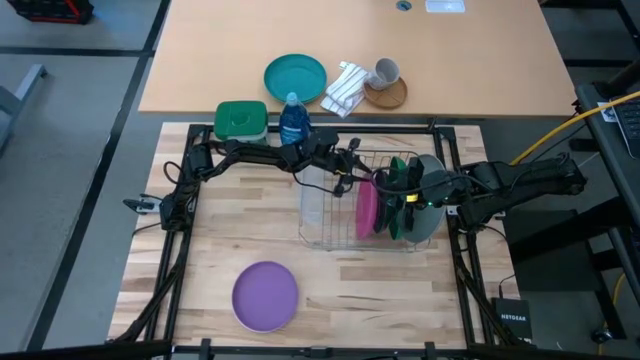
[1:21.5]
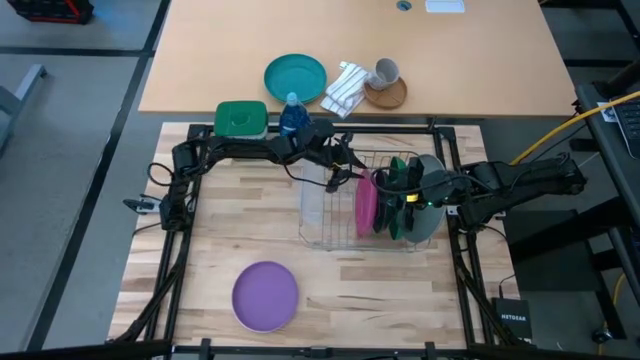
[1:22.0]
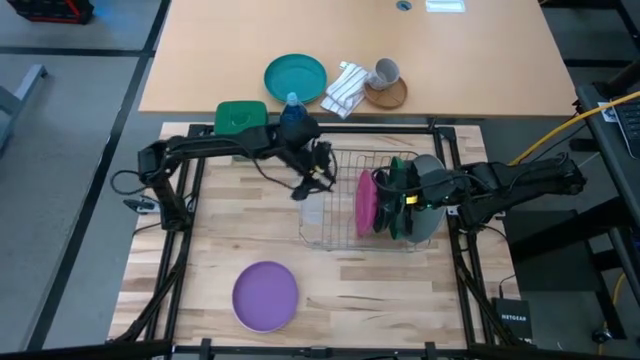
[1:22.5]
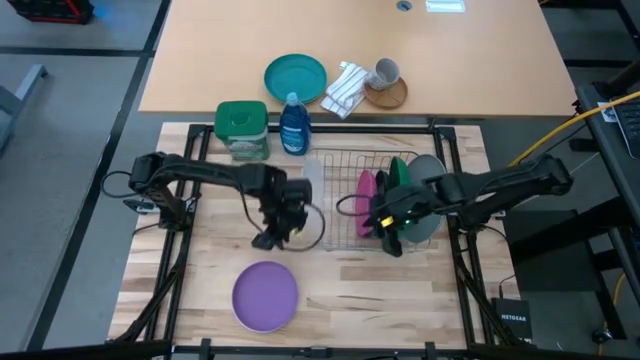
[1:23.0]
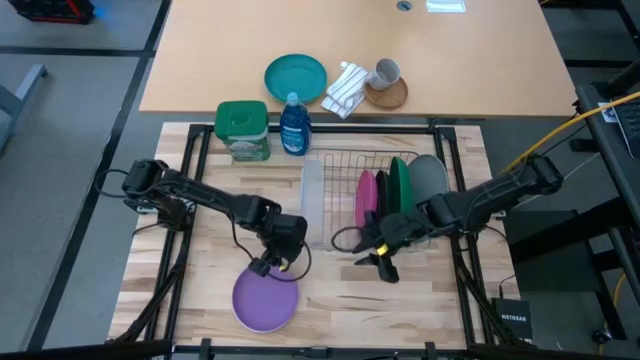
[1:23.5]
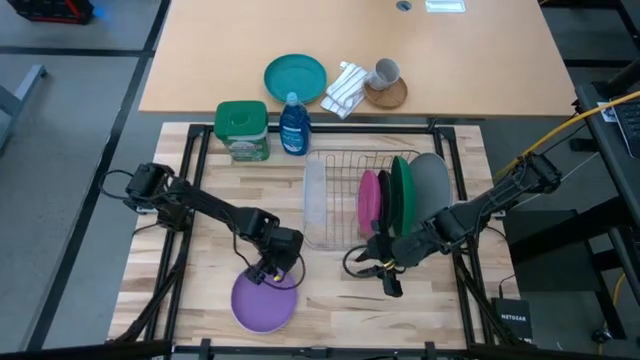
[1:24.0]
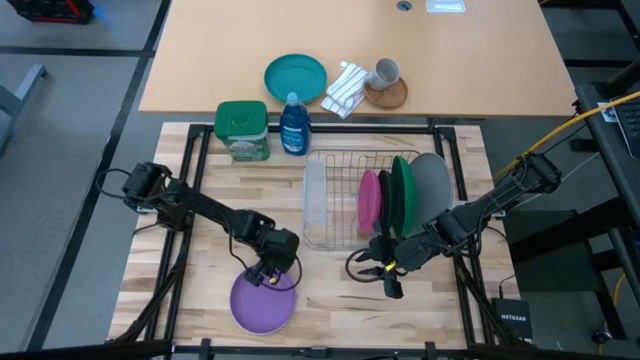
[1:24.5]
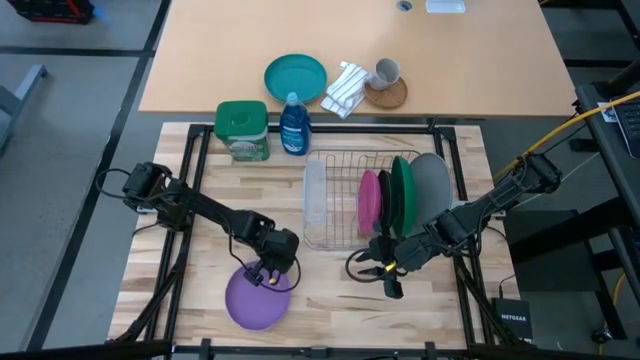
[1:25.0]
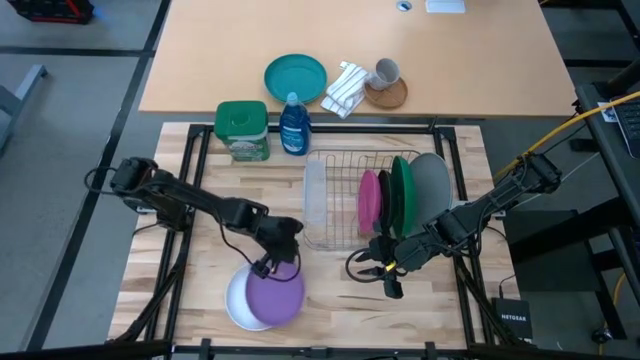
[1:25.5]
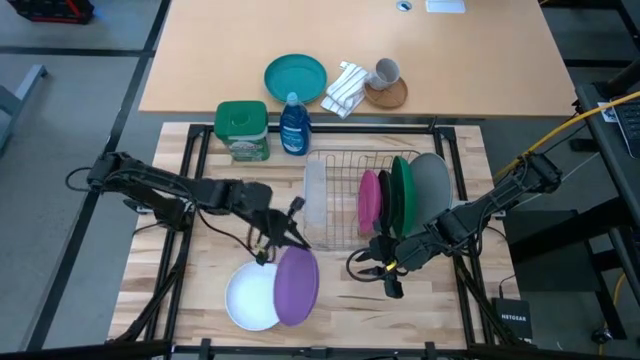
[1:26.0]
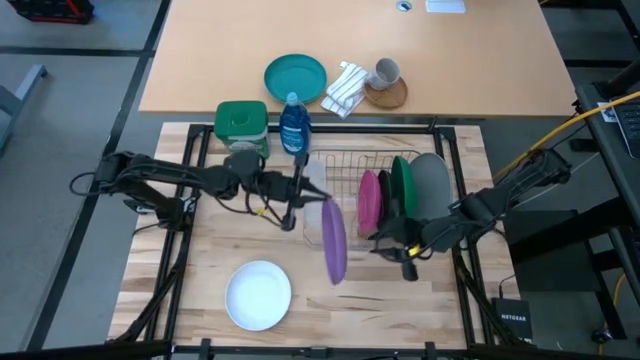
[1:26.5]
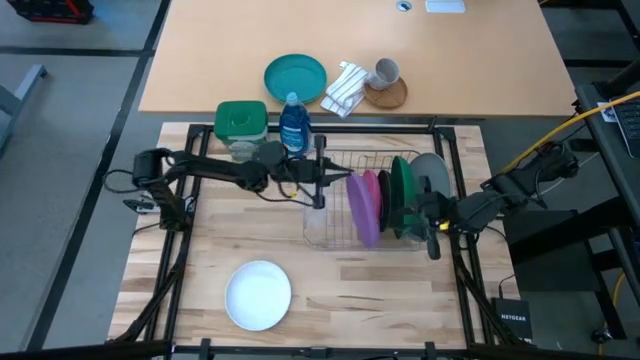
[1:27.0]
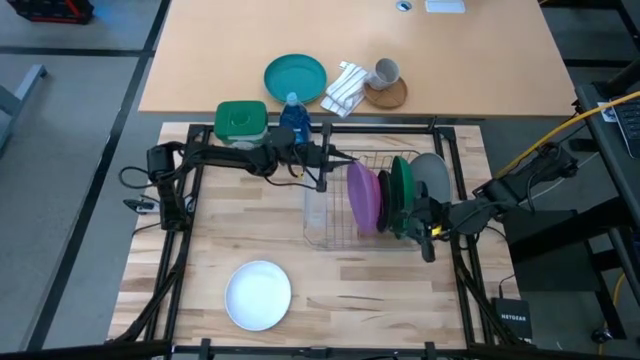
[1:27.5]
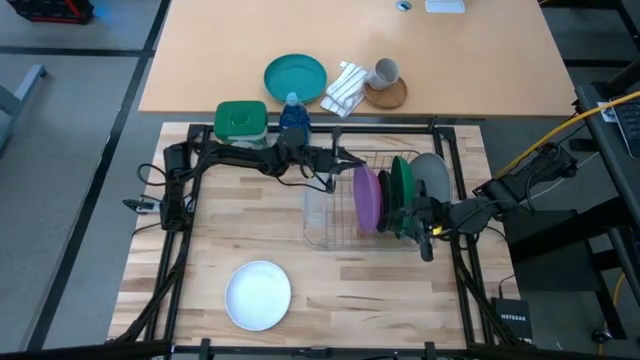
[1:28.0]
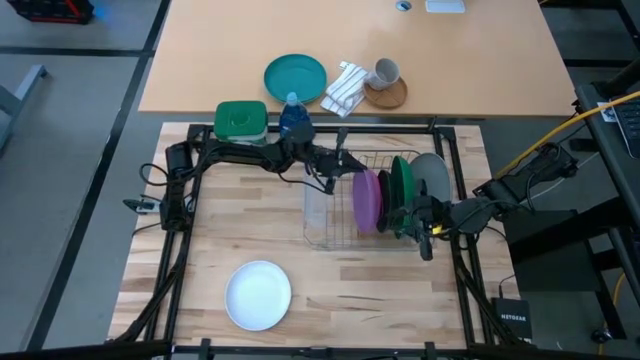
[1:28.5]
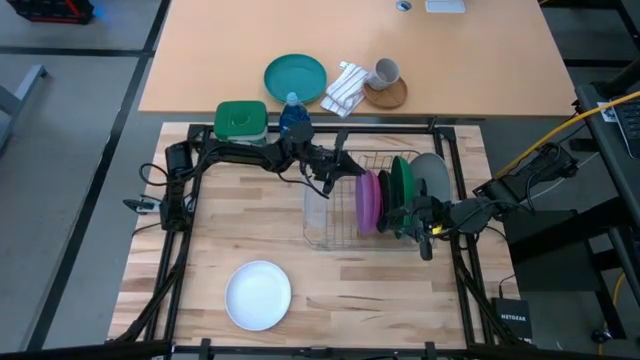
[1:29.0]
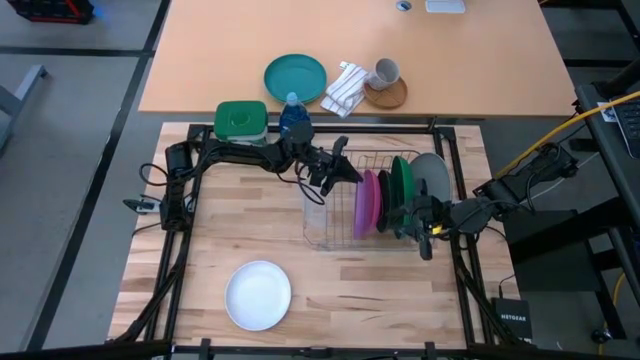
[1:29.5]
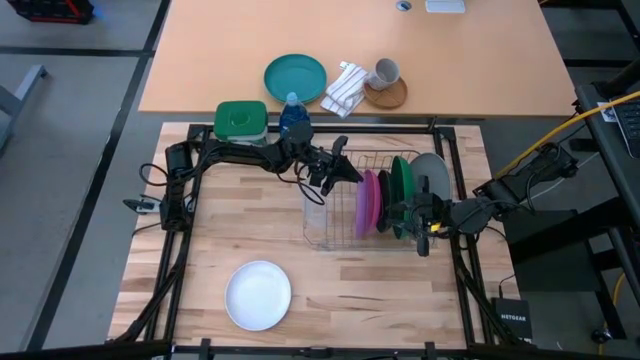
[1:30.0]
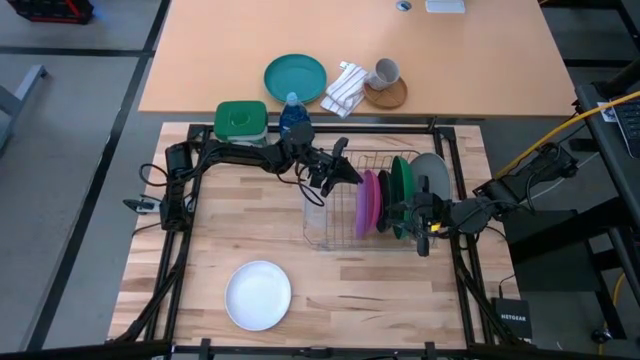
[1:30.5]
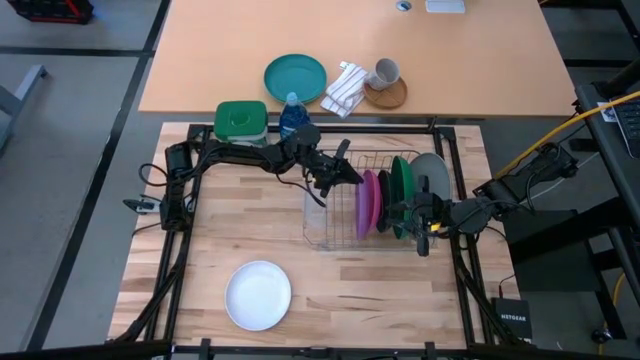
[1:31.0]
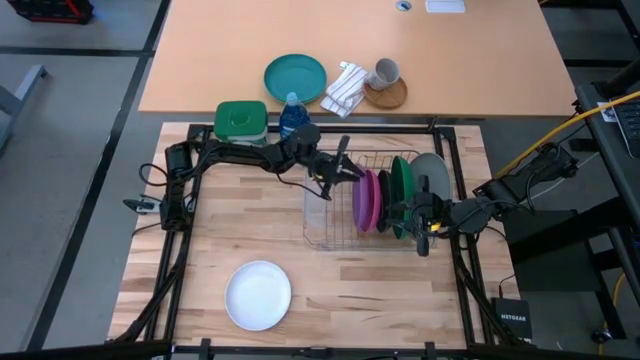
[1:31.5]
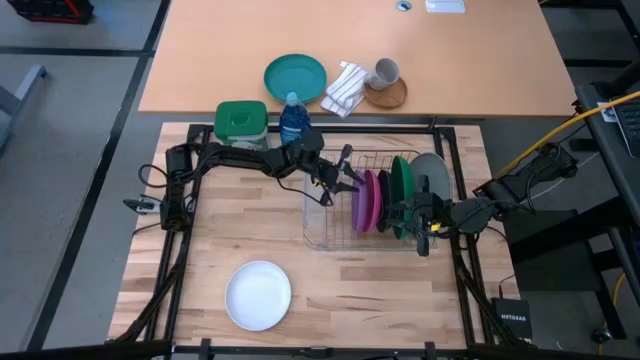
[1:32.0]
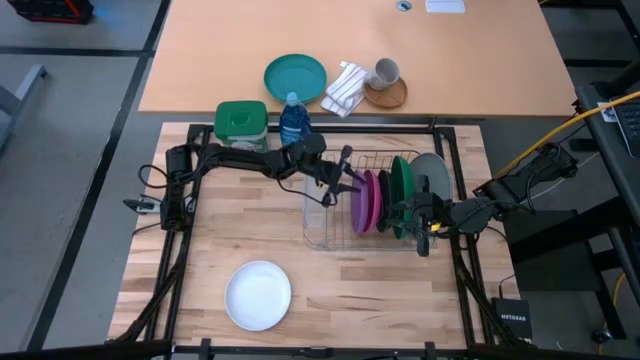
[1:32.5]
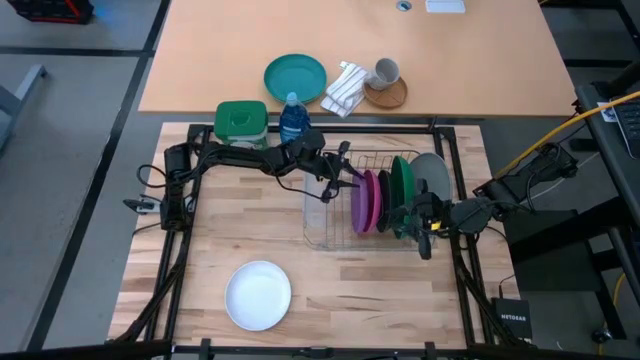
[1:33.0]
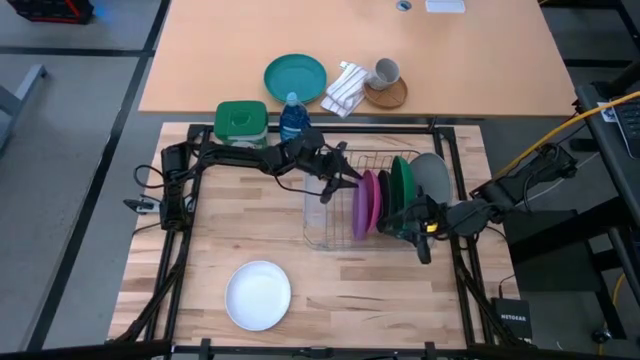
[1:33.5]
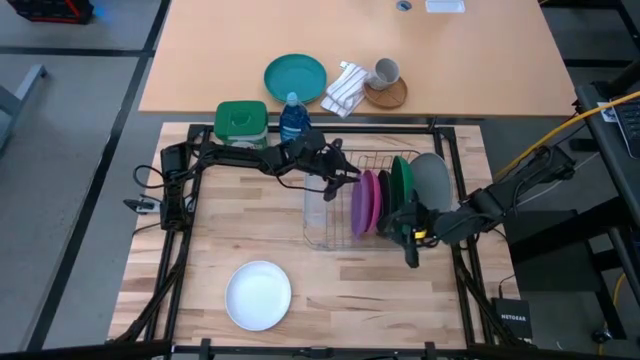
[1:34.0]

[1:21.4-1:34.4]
Task: Sort dishes
Put the purple plate into the dish rack

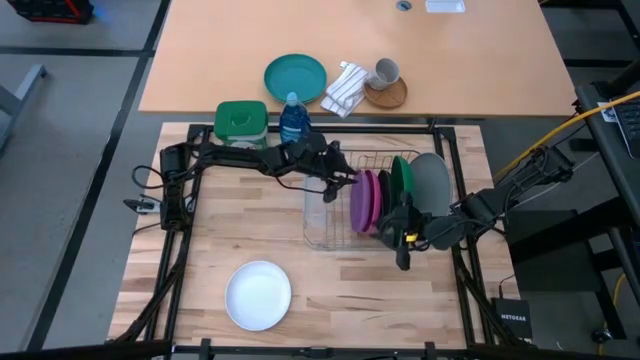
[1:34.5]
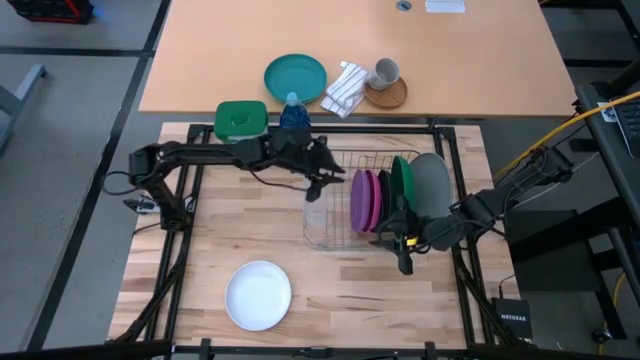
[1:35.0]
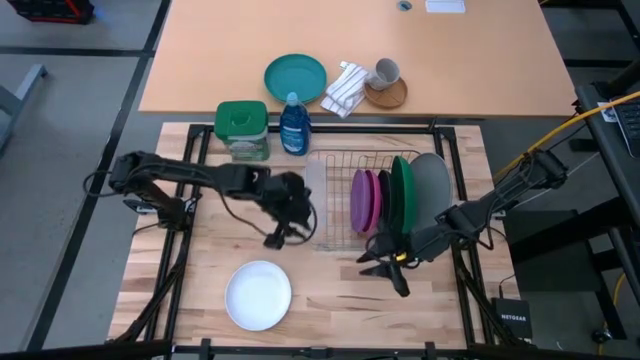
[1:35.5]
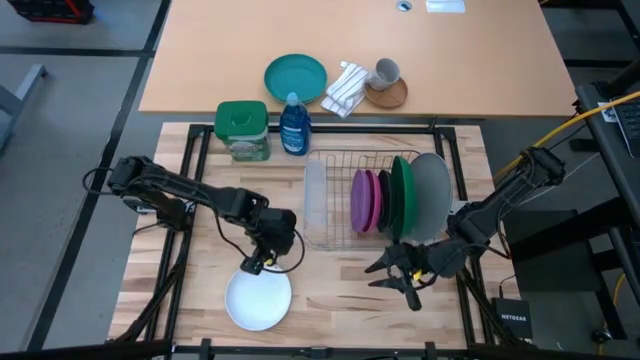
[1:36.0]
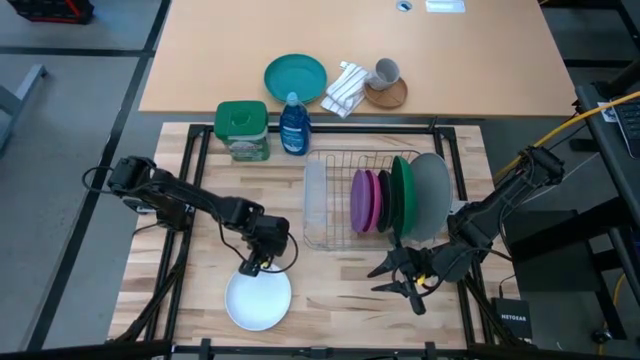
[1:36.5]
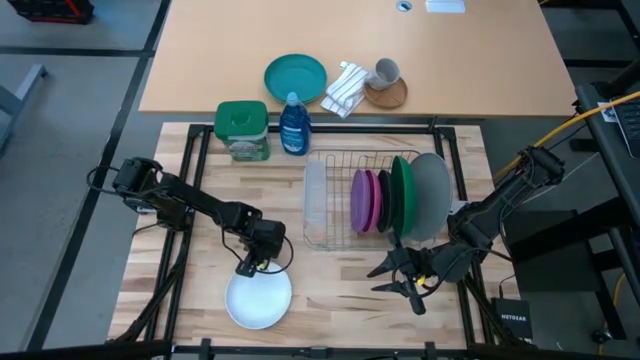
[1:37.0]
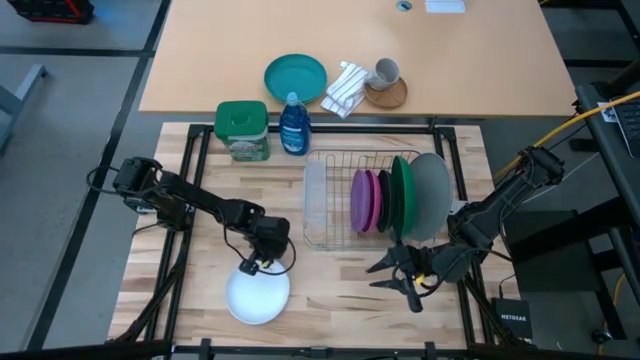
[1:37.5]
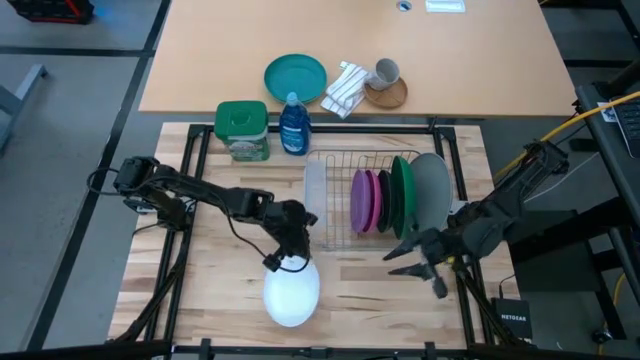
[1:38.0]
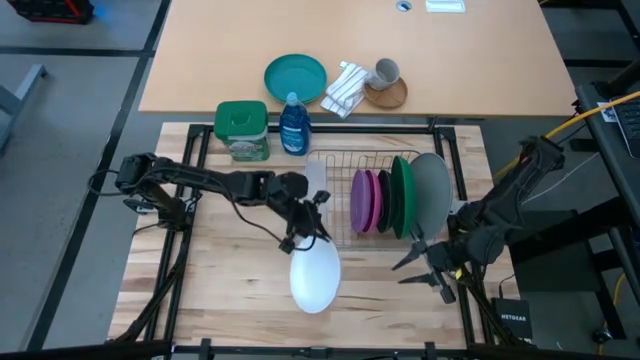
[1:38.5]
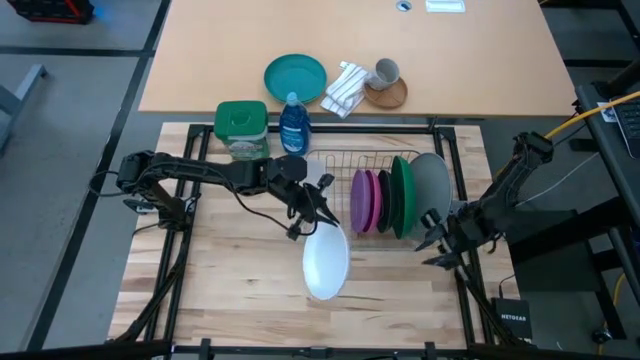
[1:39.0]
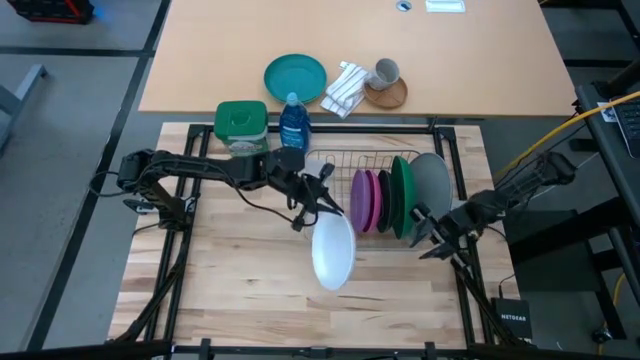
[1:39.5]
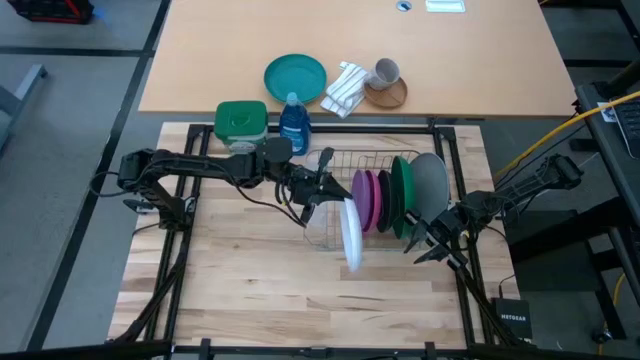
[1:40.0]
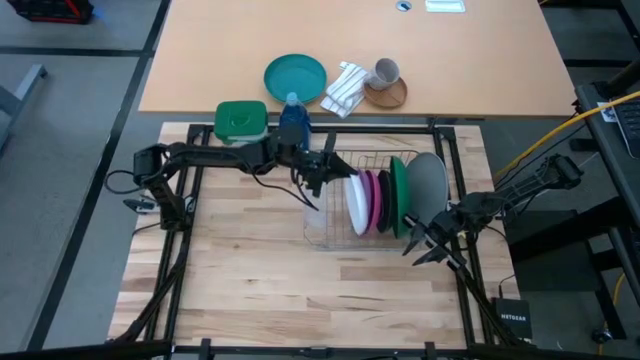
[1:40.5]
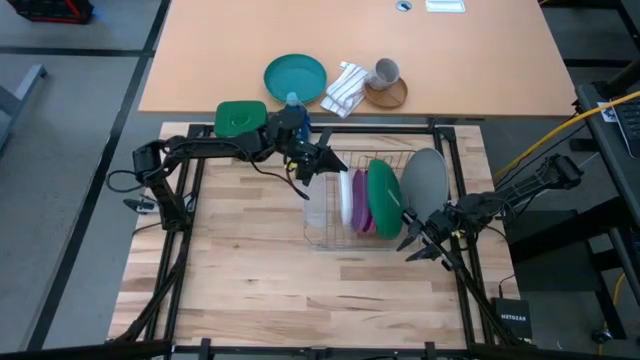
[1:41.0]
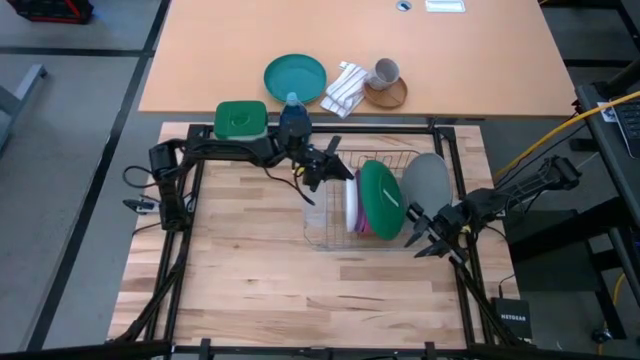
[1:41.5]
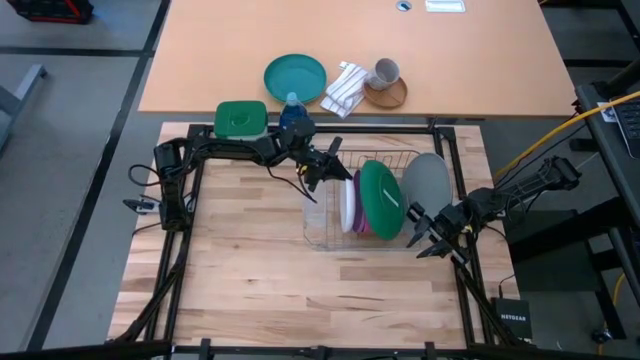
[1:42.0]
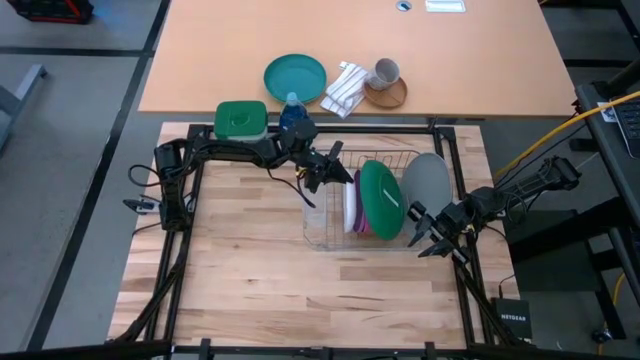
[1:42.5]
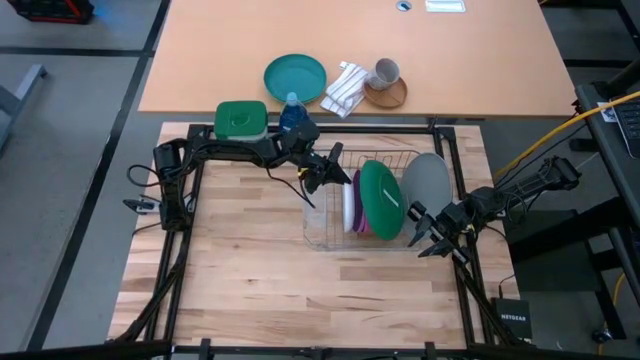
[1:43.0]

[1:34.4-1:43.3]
Put the white plate into the dish rack
